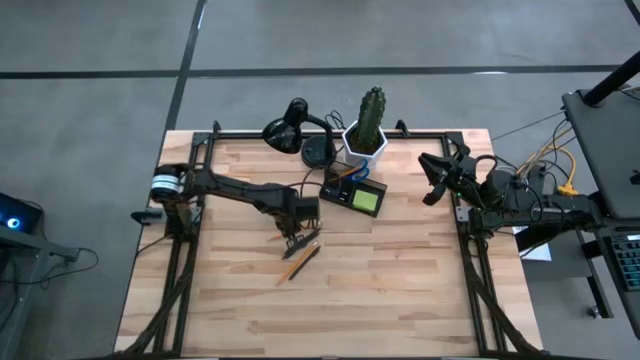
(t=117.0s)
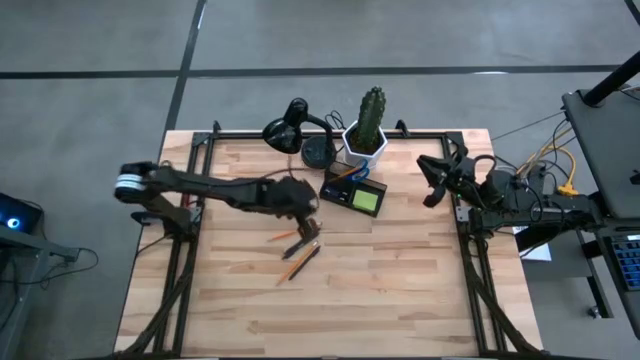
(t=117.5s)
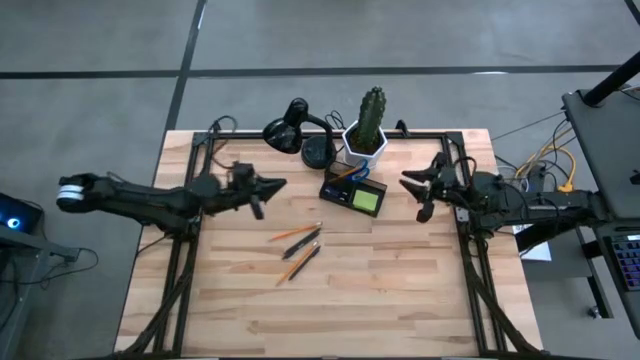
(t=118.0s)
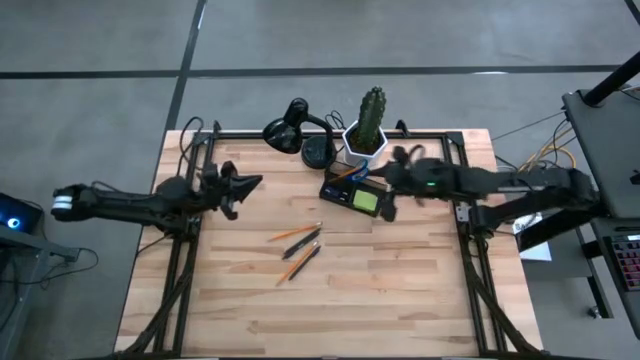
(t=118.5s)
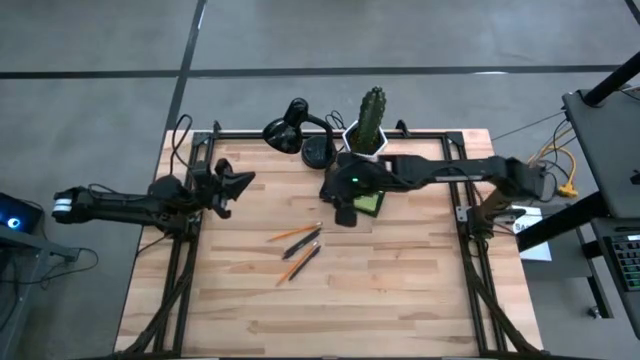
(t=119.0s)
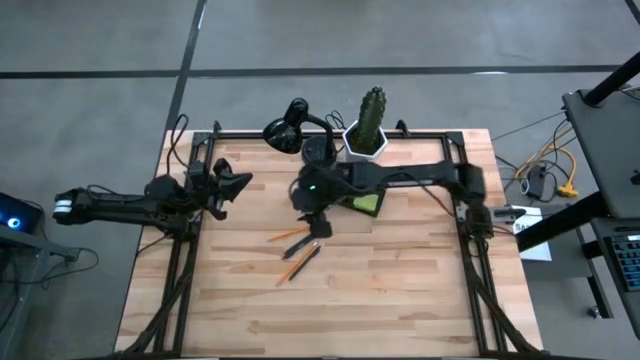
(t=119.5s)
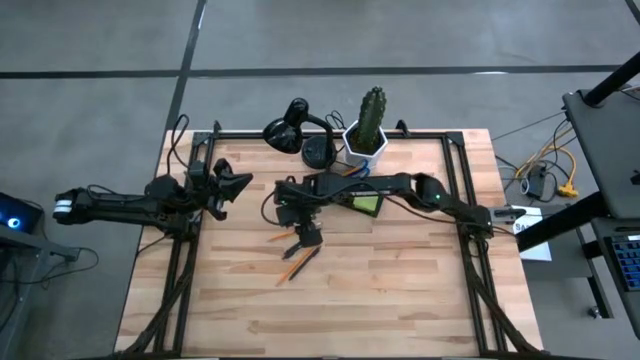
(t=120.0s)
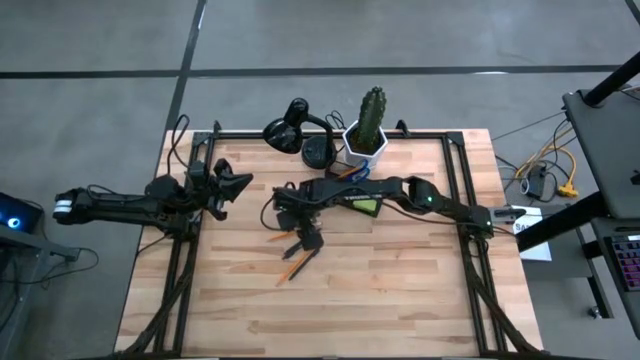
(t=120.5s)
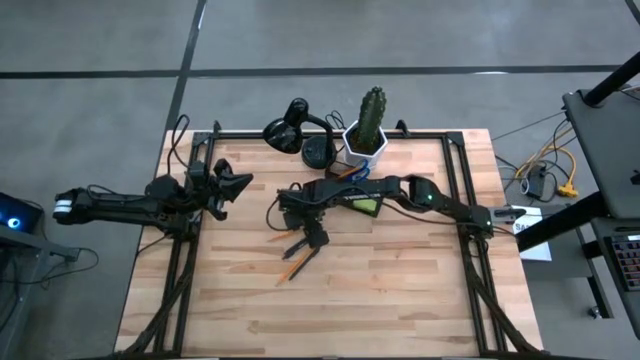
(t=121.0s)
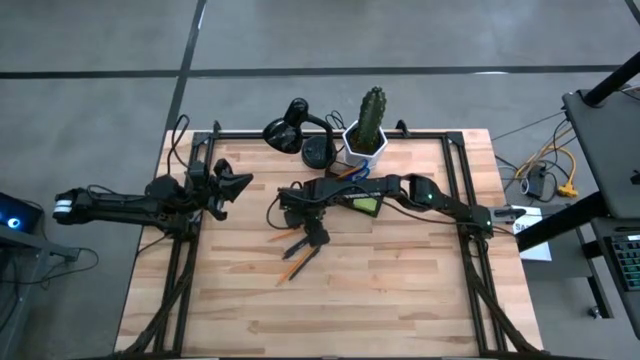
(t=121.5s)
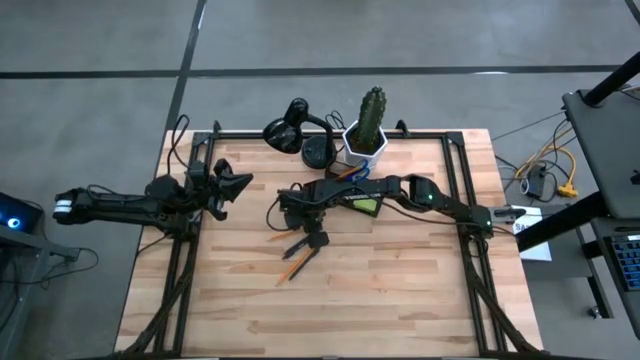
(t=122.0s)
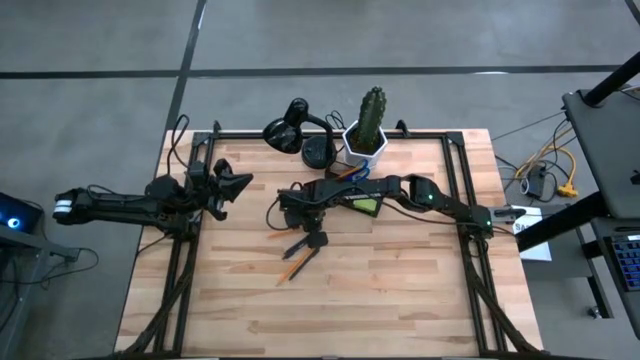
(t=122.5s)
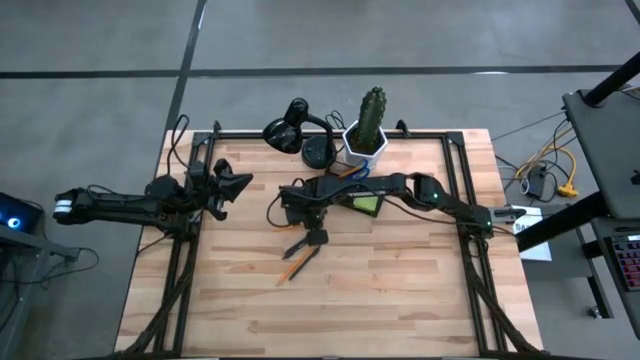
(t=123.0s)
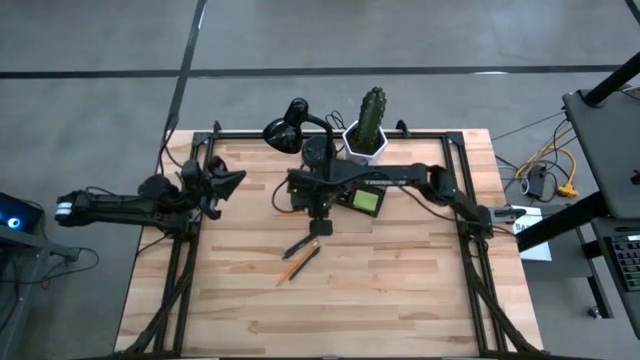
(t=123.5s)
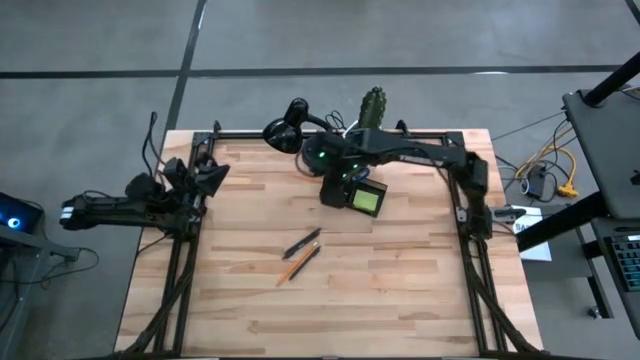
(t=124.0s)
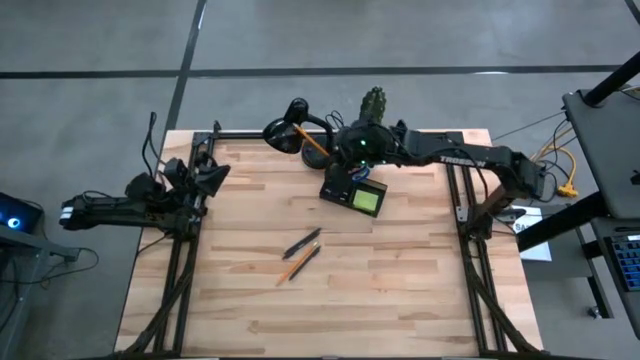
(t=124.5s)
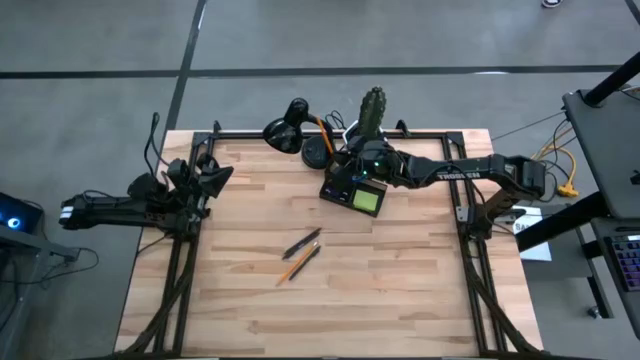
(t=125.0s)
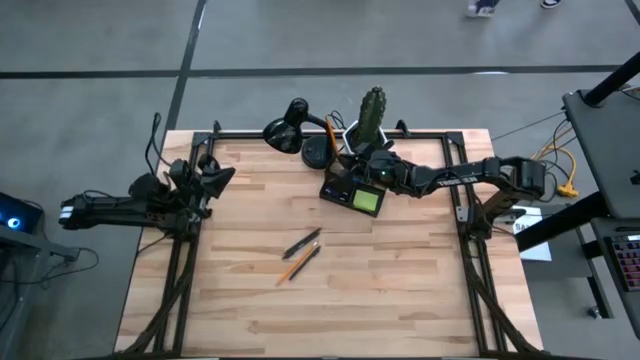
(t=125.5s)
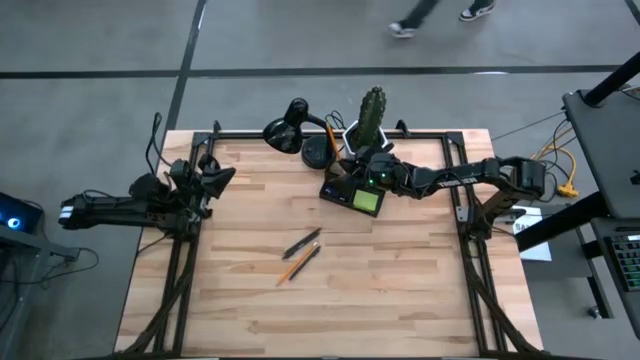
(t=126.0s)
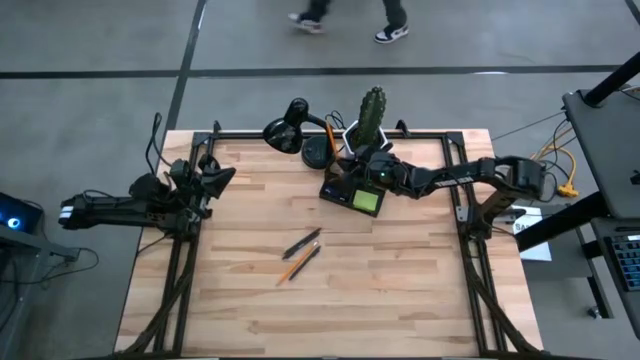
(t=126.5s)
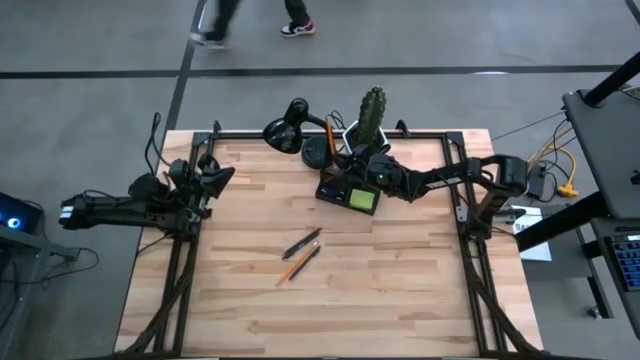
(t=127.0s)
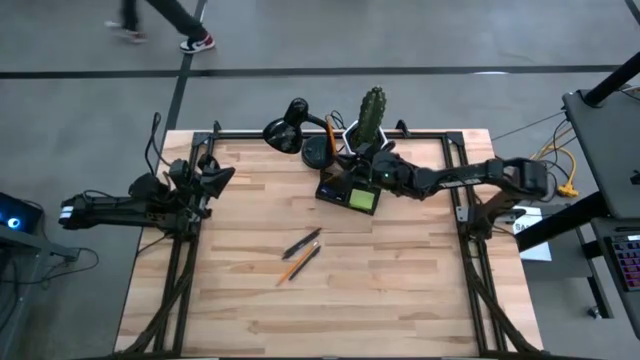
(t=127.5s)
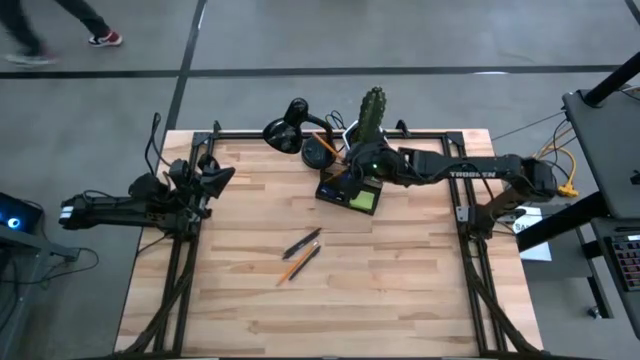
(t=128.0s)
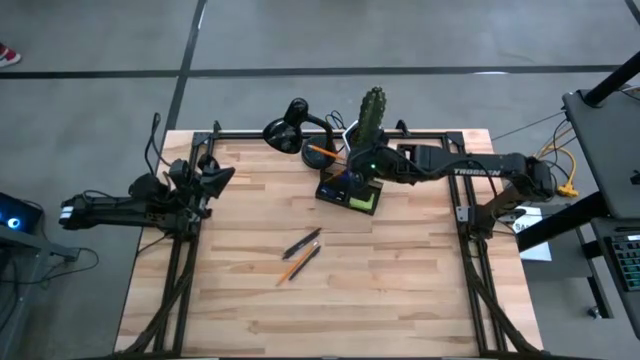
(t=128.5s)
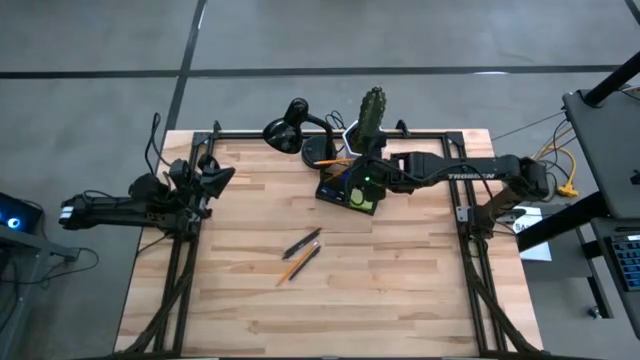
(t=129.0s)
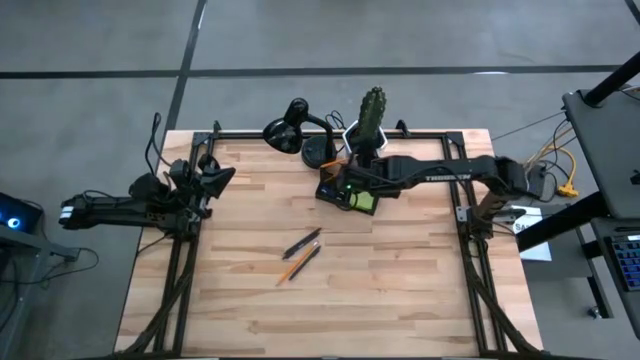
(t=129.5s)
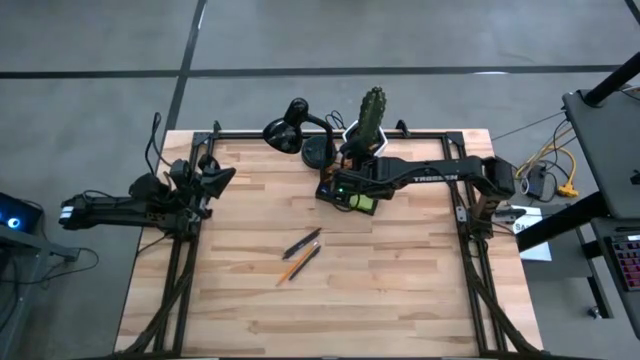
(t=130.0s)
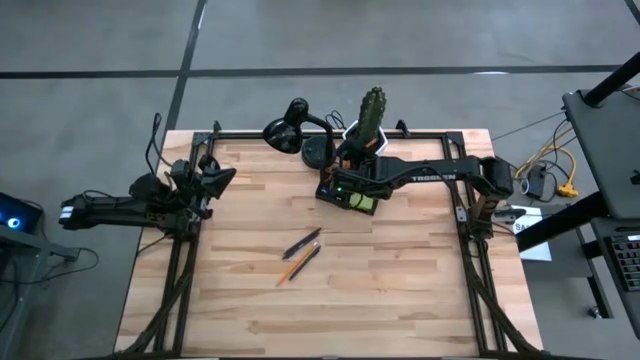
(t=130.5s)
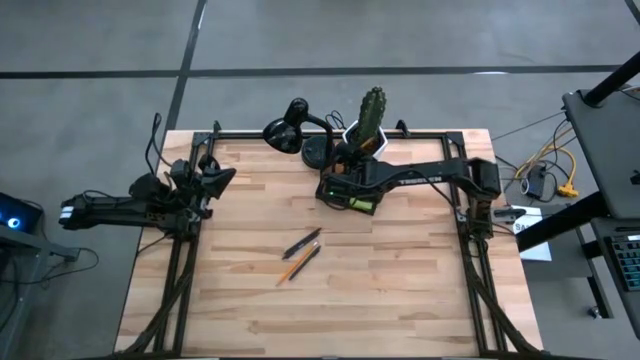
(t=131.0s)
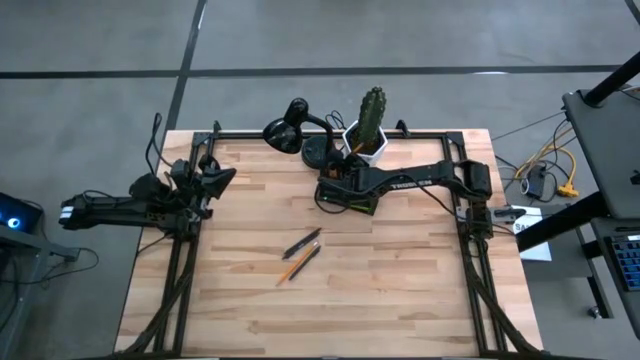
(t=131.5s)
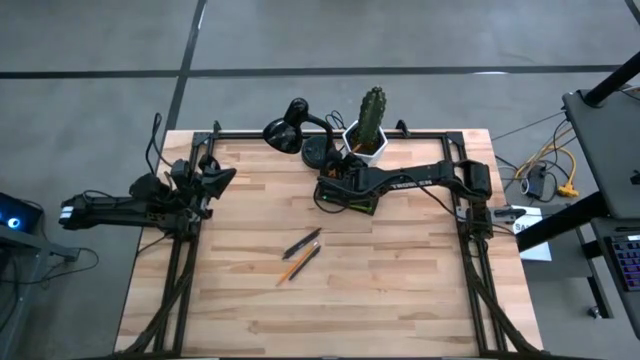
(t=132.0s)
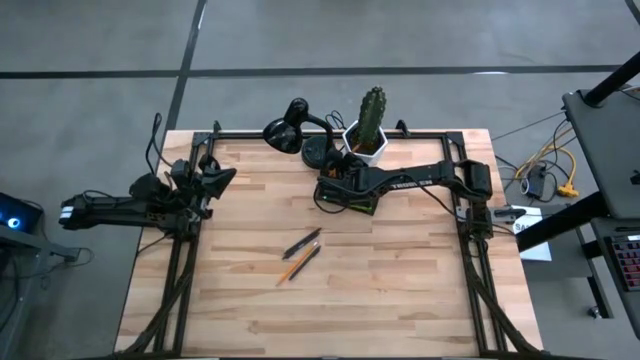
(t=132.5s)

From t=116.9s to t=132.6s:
Task: Pick and place office supplies into organizer
Put the top orange pencil into the black desk organizer

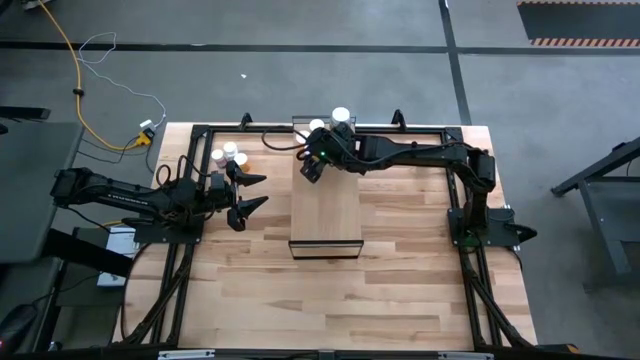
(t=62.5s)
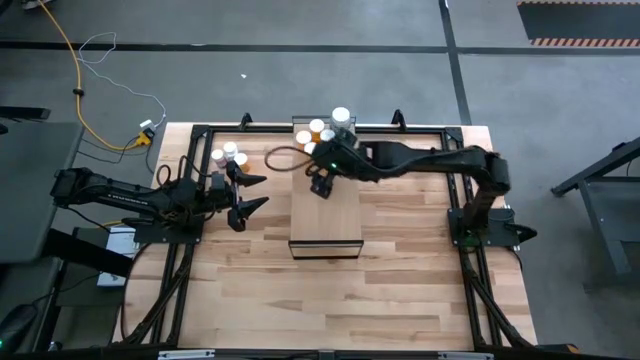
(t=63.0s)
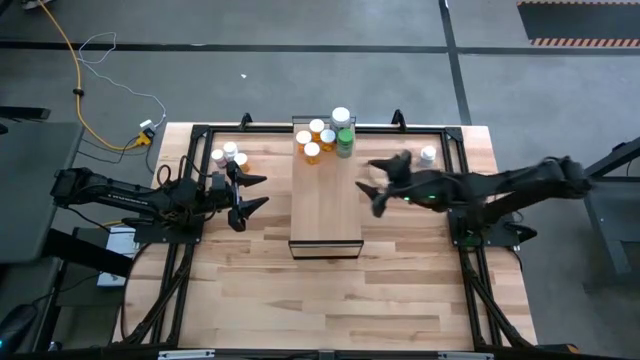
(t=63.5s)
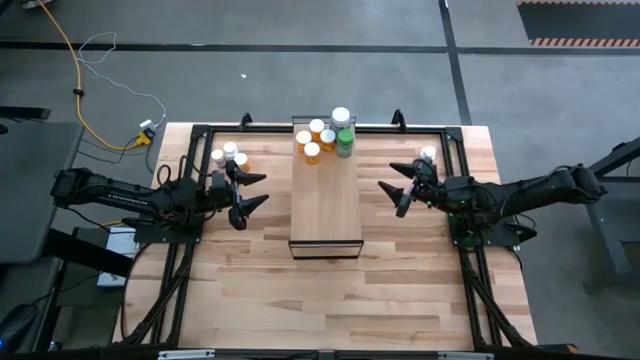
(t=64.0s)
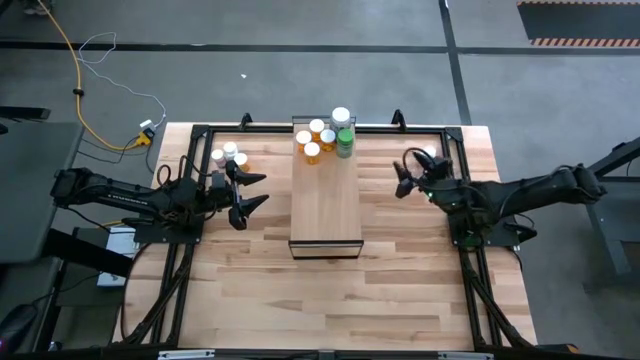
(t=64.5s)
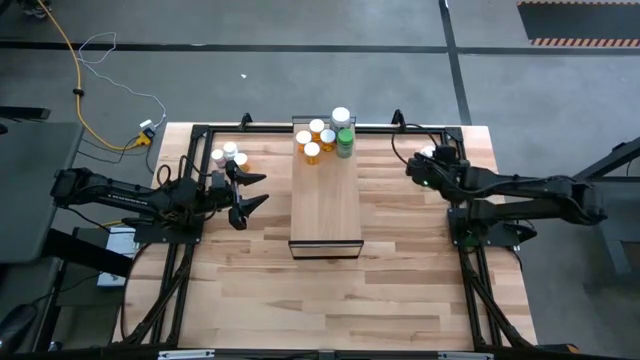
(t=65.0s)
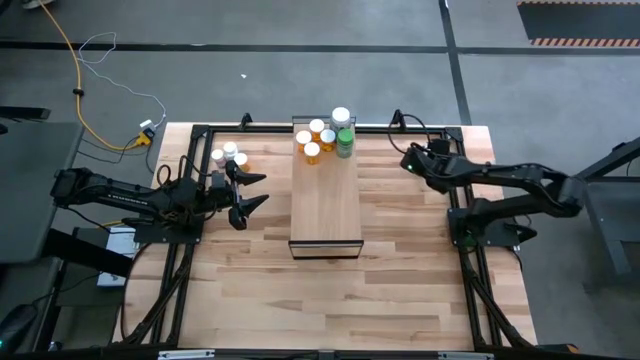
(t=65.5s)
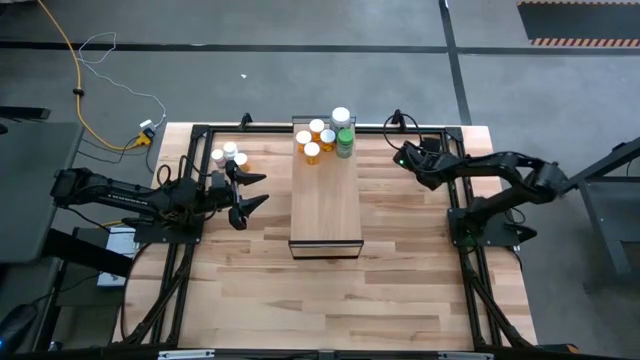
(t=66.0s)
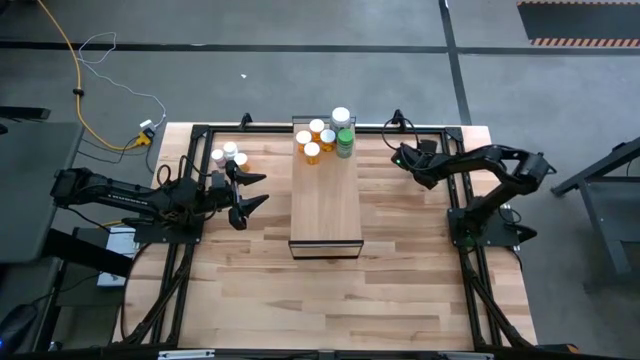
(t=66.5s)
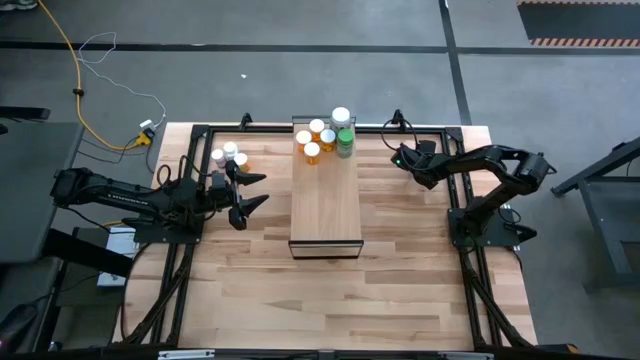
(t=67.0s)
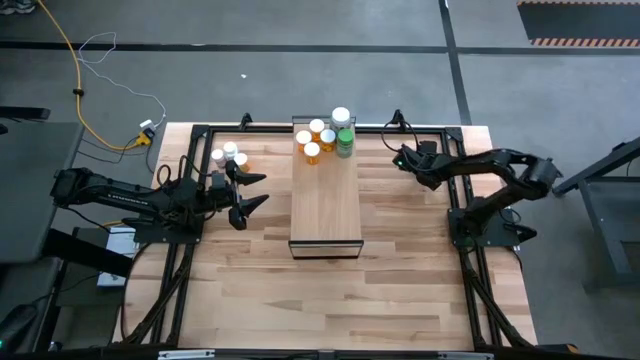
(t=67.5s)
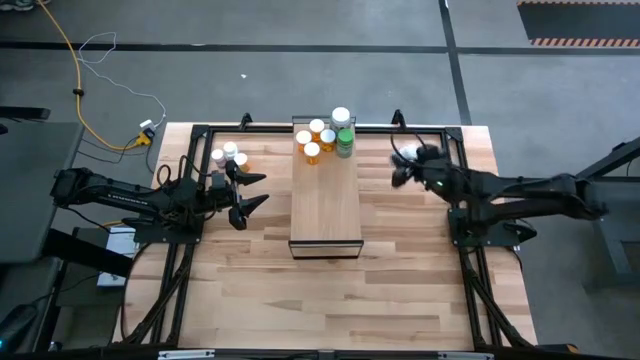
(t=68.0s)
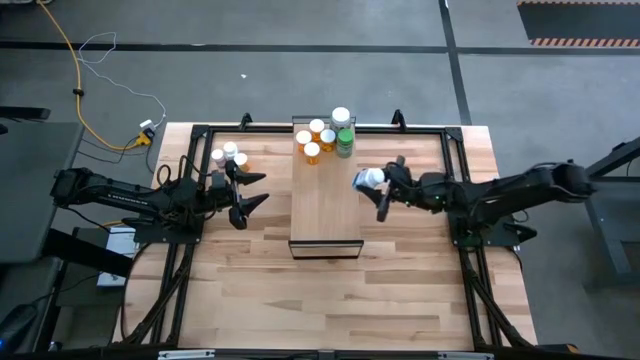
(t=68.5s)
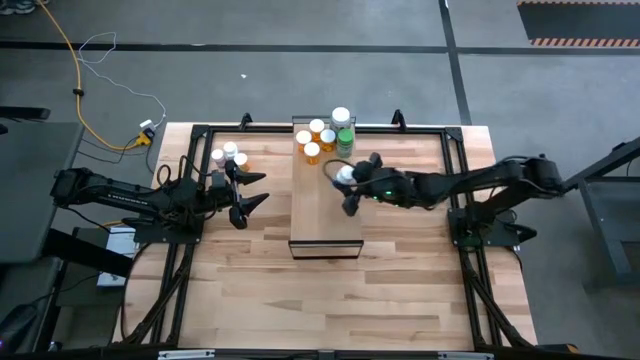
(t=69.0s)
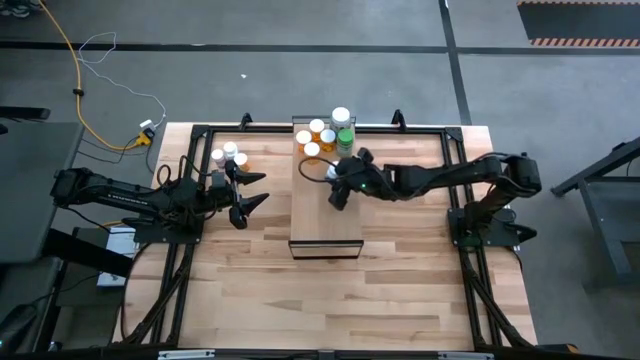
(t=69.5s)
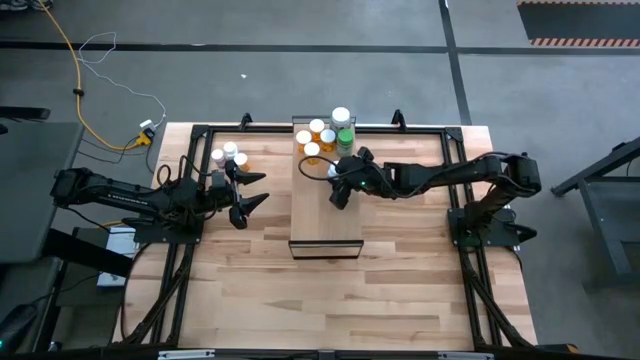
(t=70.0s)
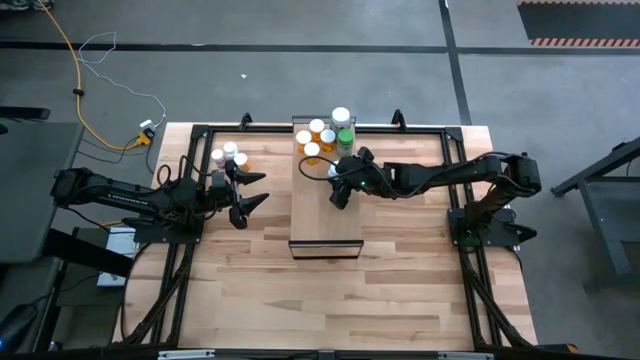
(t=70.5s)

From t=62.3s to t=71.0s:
Task: Pick and place medicine bottles onto shelf by color
Put the right white pill bottle on the shelf
